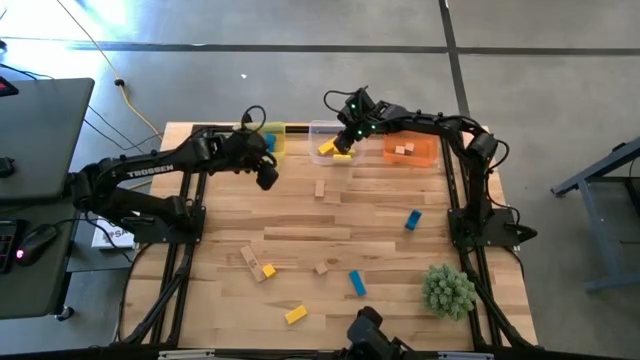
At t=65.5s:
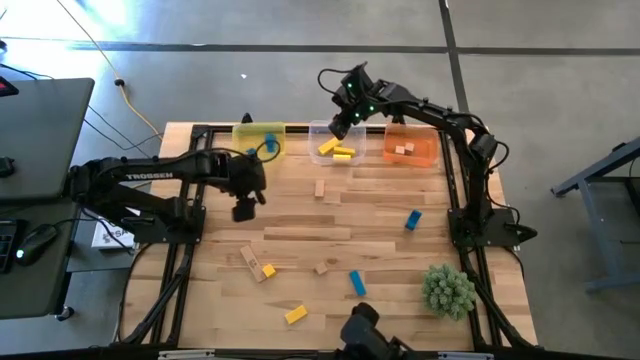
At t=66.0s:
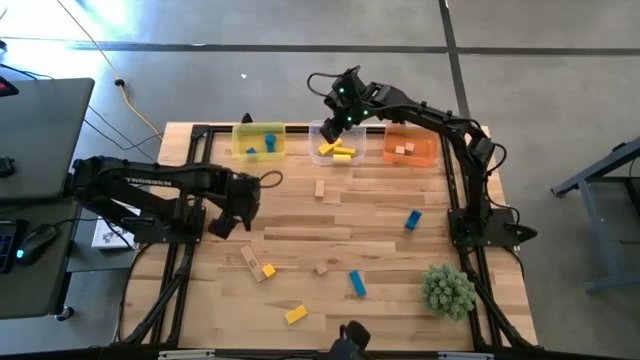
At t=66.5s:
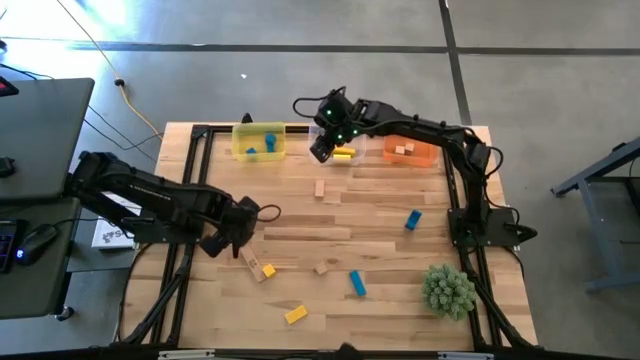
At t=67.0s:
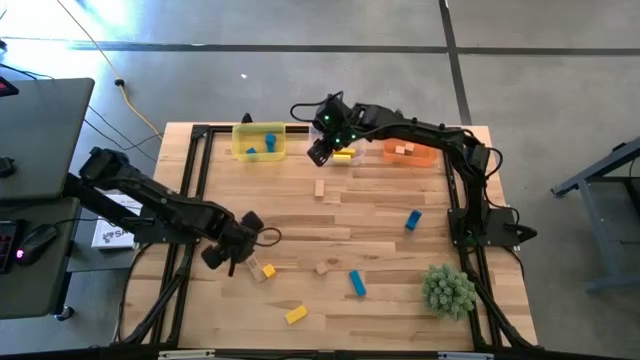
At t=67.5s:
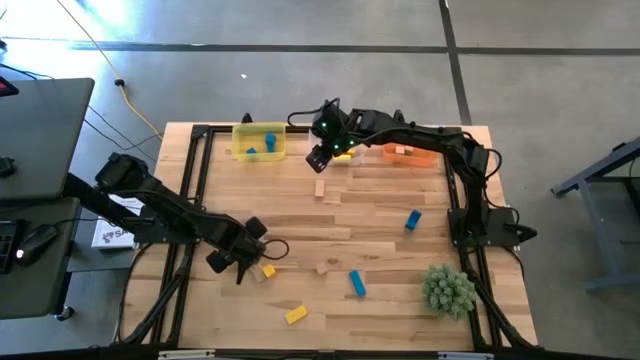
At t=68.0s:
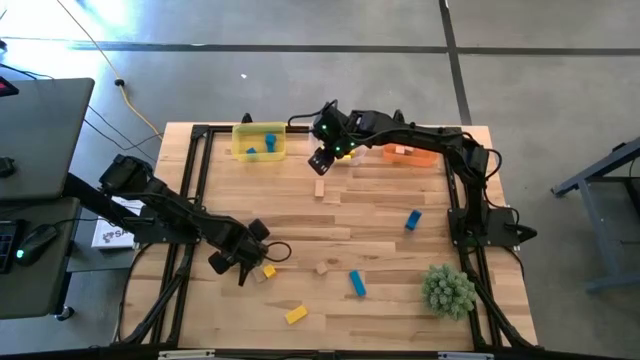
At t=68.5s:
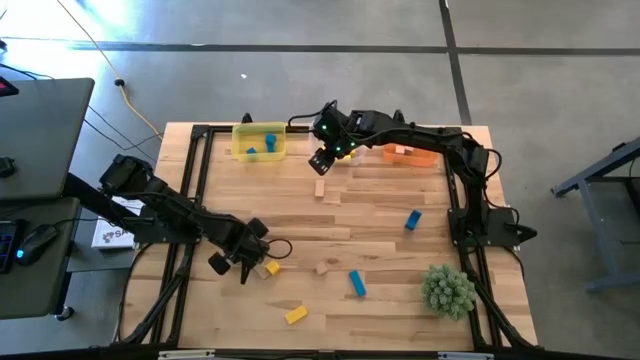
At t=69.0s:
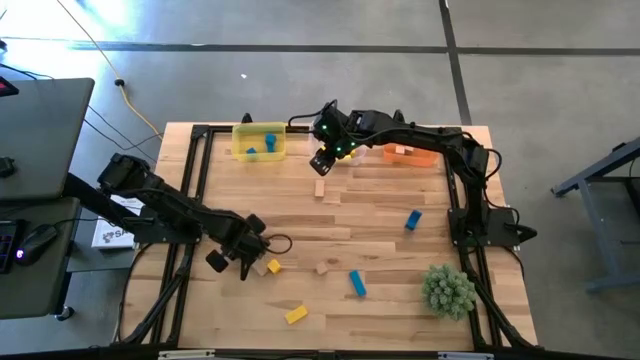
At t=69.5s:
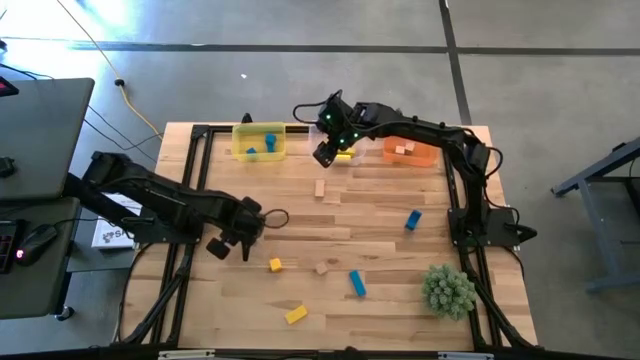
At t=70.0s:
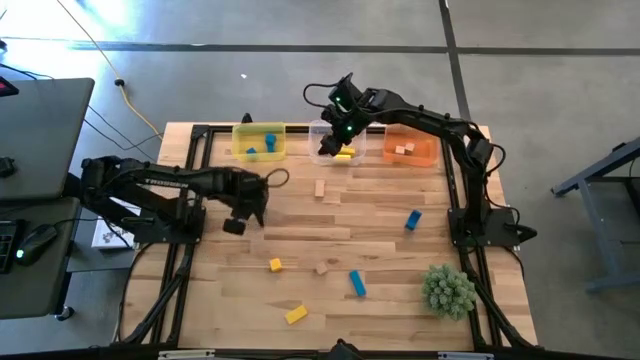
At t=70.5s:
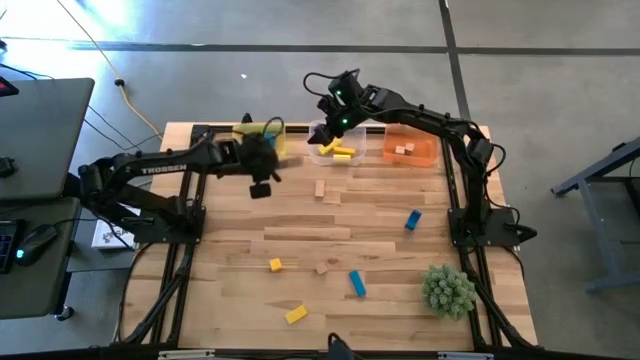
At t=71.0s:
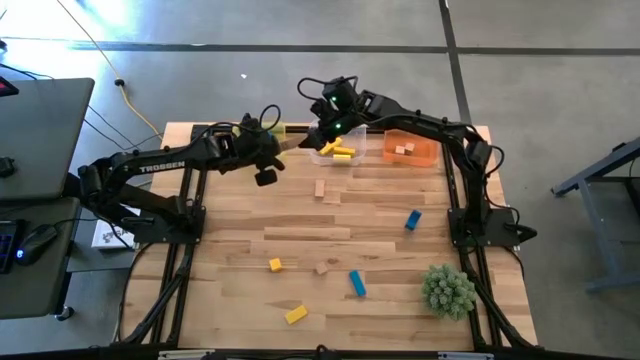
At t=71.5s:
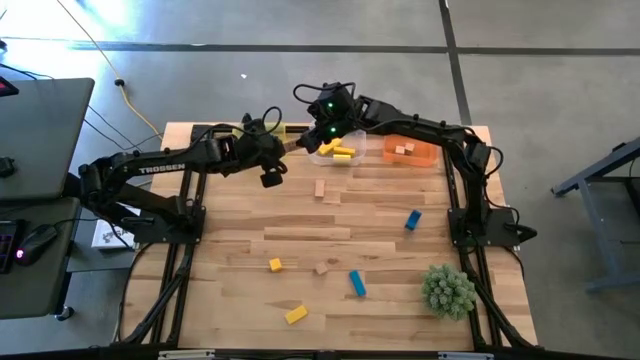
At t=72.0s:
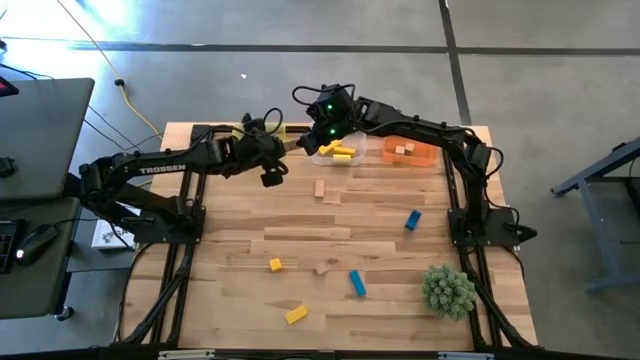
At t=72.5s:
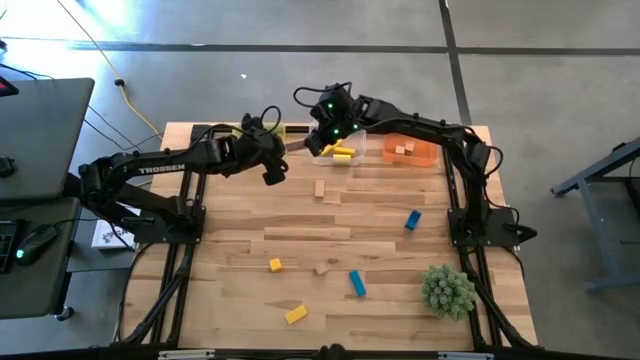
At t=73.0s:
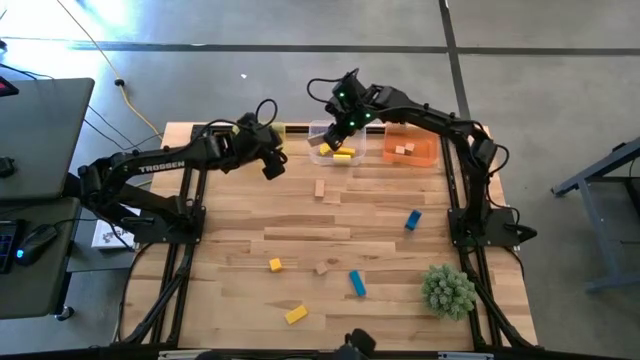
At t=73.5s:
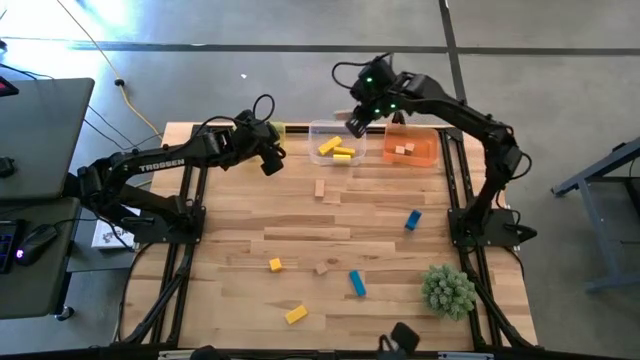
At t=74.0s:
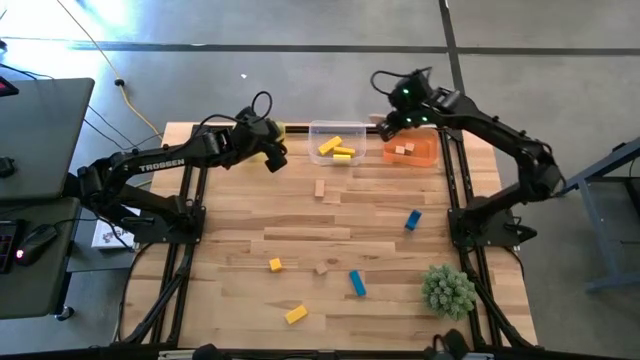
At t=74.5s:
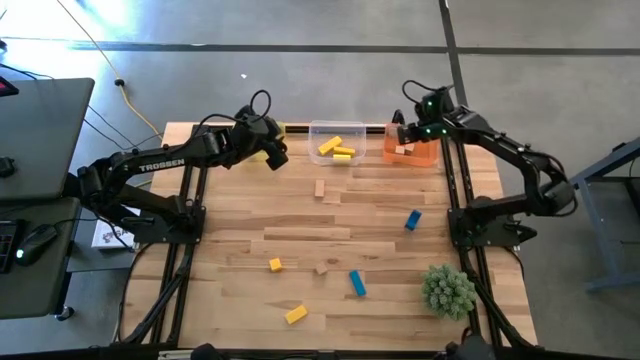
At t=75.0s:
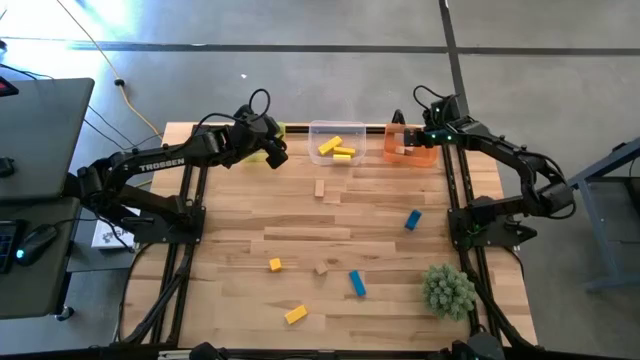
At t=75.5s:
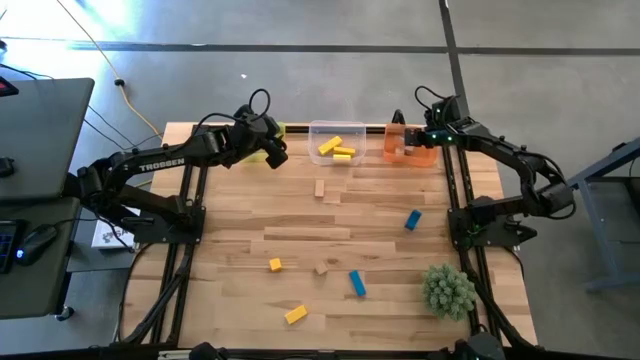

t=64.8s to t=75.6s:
Task: Sort & place blocks by color
Put the brown block into the orange bin

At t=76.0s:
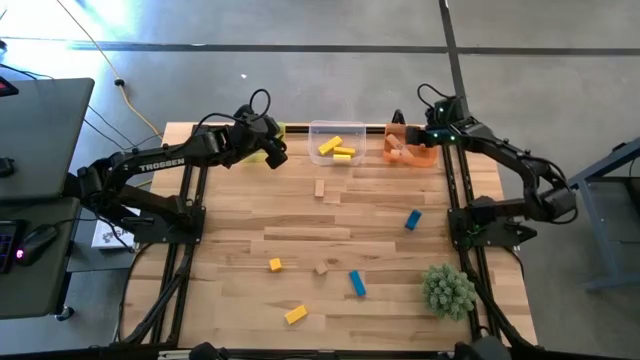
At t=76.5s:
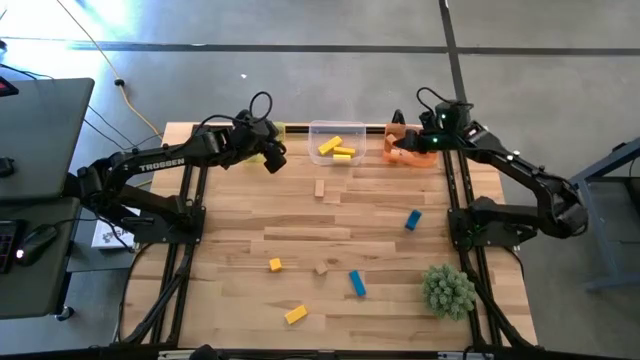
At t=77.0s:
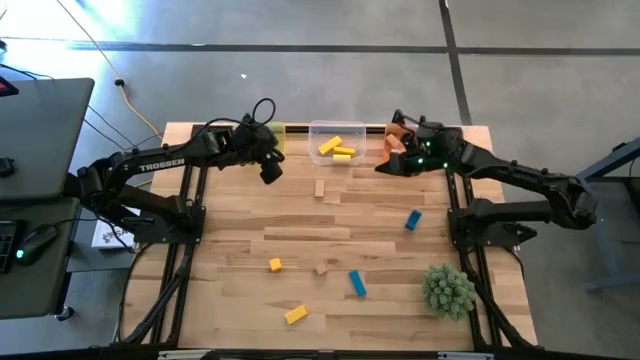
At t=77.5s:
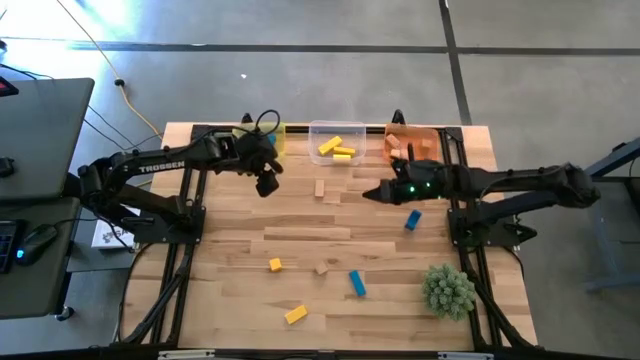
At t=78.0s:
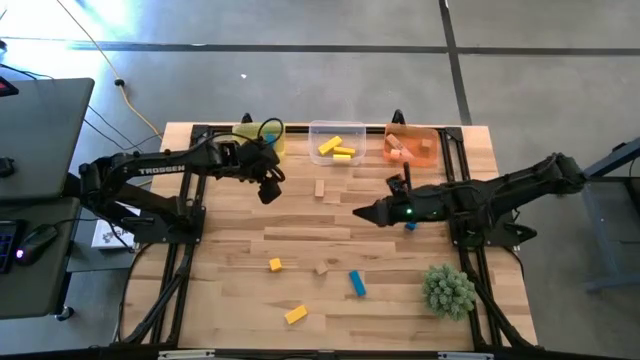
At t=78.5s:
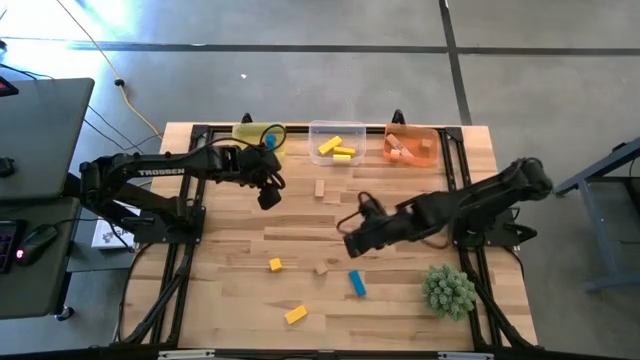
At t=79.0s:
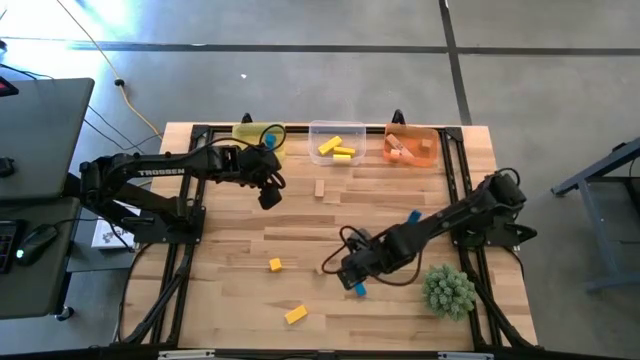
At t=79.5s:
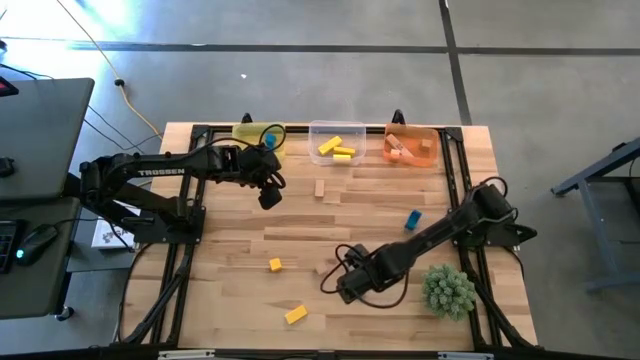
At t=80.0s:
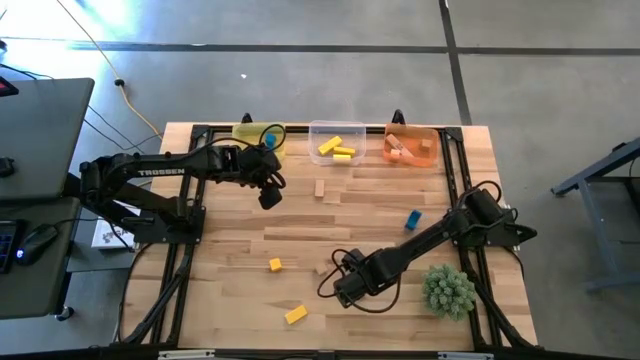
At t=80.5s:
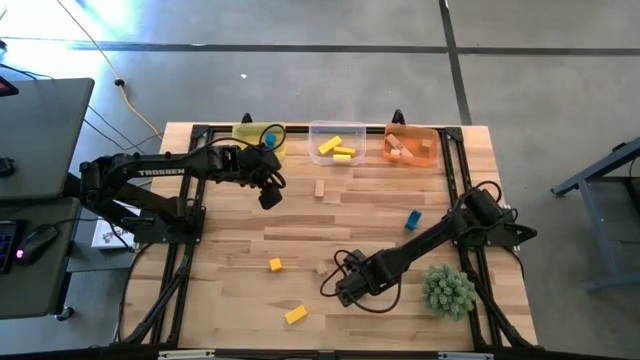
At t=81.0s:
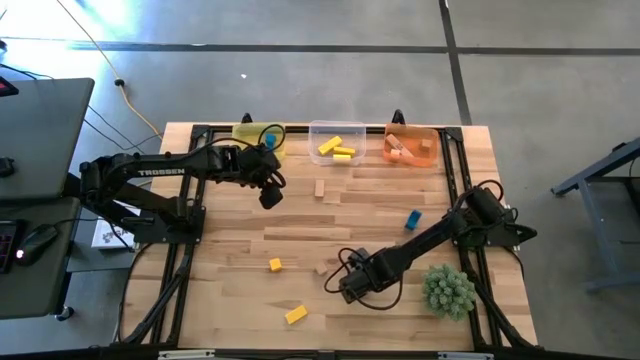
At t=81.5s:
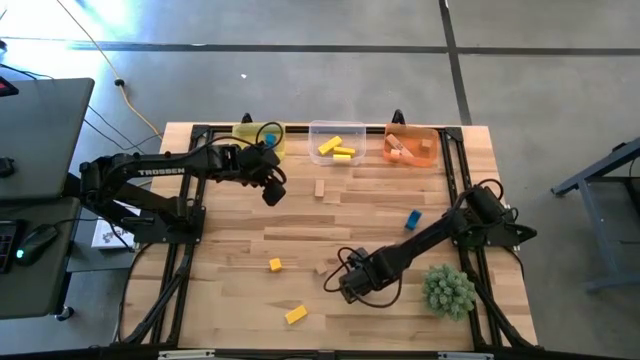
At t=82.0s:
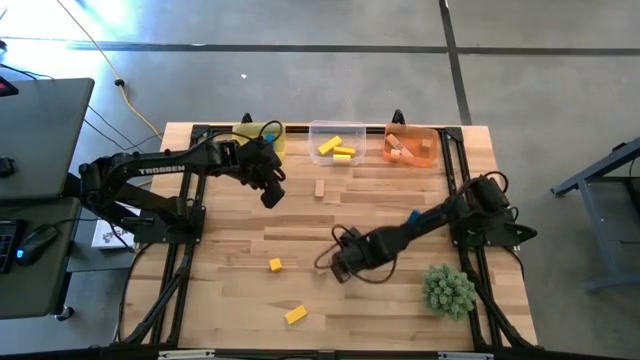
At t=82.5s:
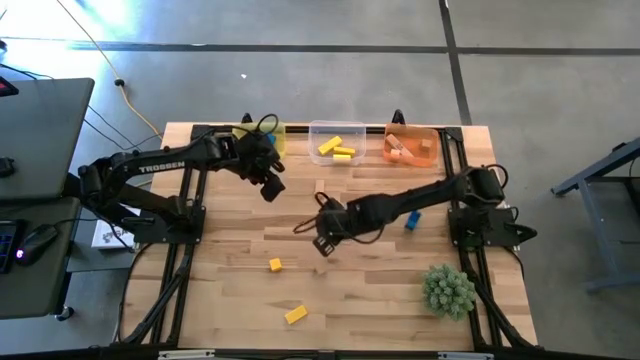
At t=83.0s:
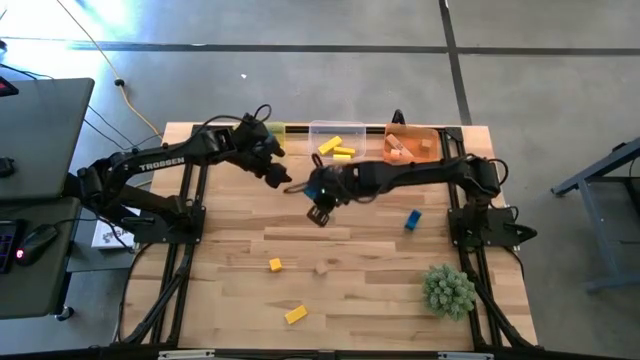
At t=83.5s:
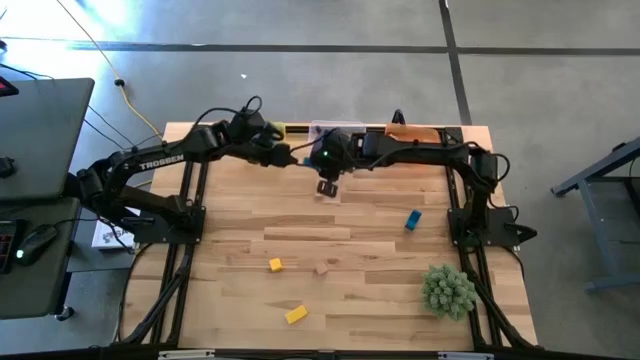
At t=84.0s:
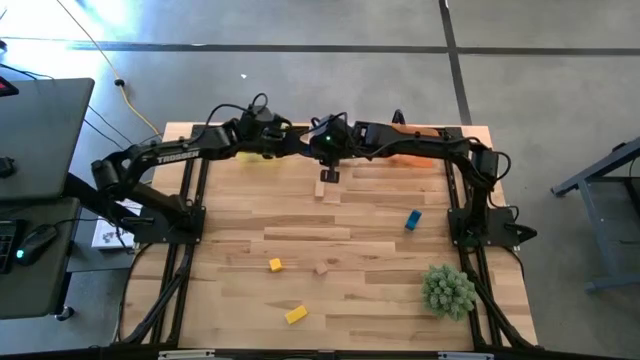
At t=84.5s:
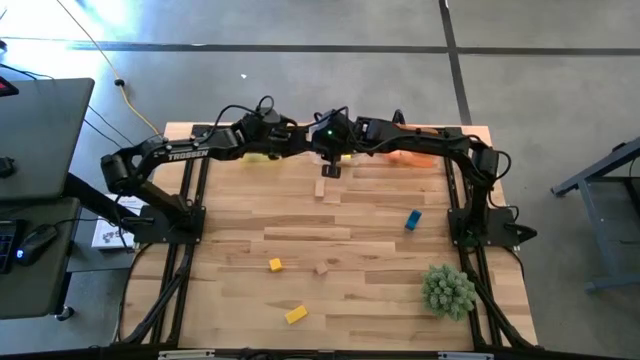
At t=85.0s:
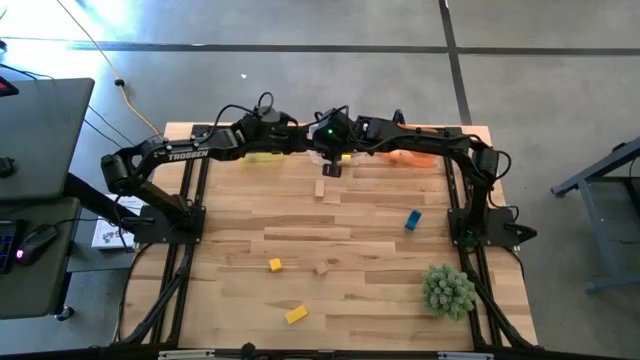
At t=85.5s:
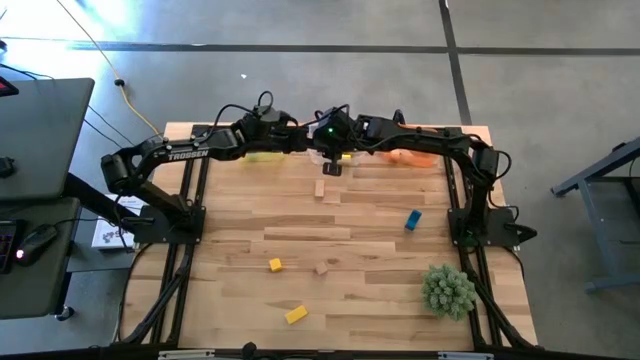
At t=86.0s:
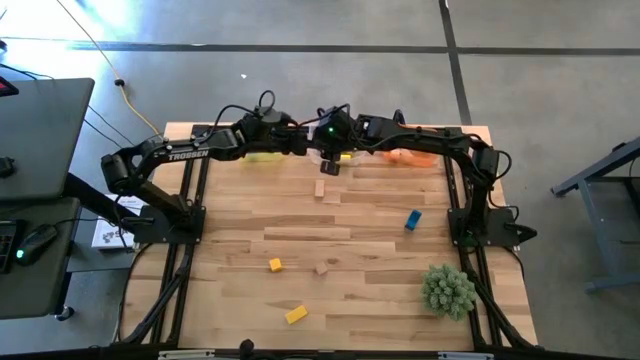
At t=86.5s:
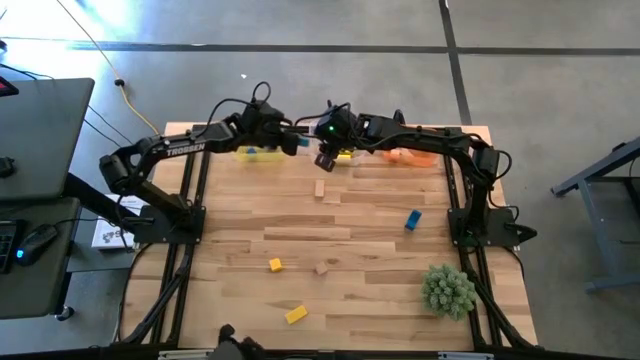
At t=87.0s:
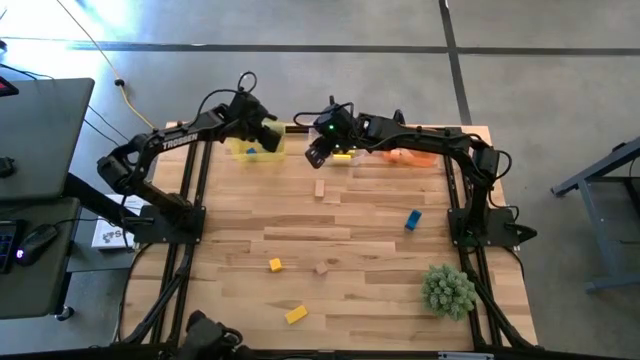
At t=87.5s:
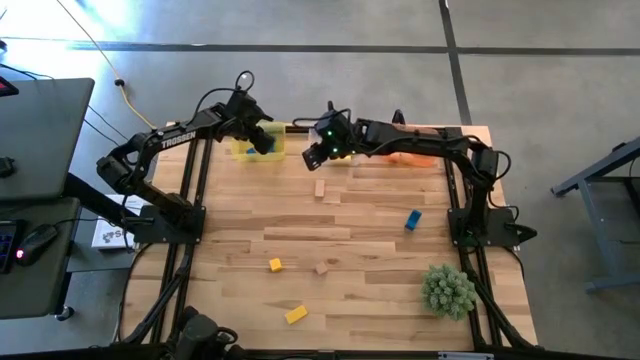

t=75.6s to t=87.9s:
Put the blue block into the yellow bin
